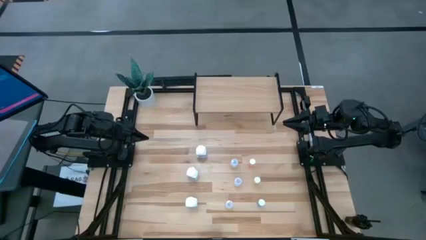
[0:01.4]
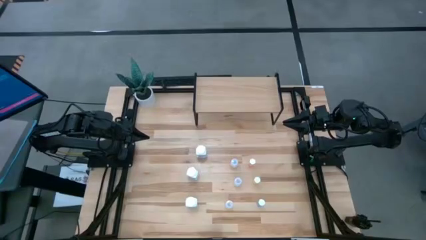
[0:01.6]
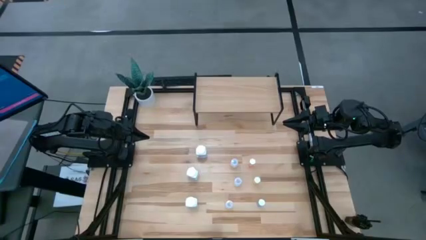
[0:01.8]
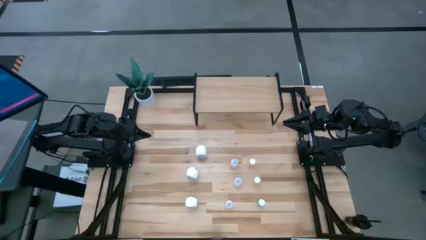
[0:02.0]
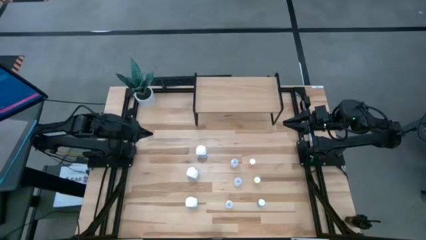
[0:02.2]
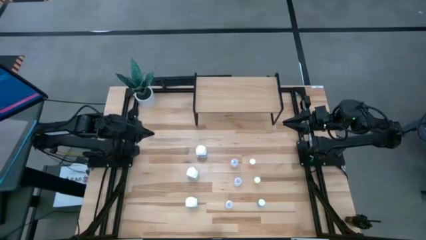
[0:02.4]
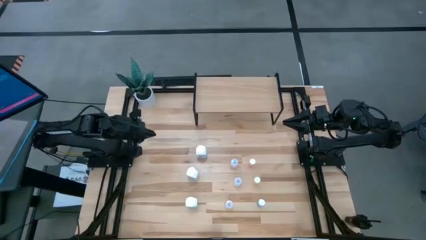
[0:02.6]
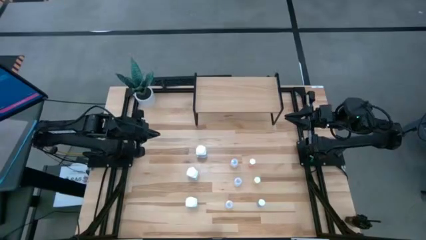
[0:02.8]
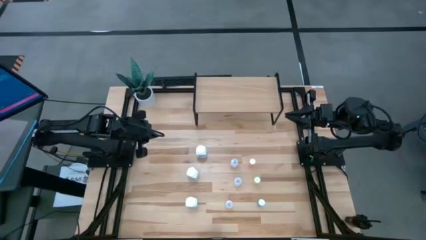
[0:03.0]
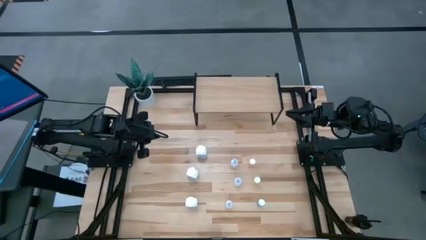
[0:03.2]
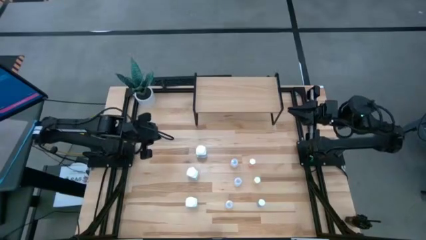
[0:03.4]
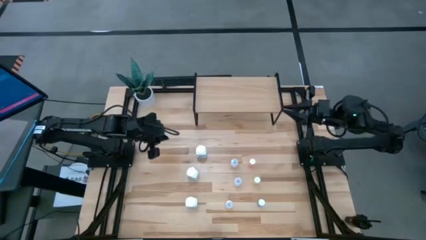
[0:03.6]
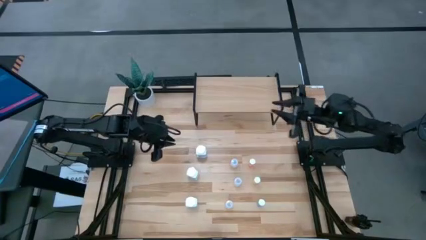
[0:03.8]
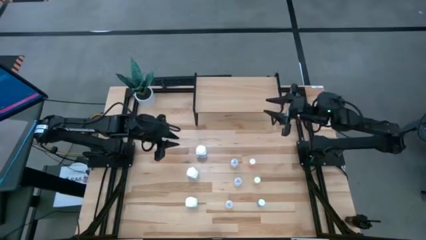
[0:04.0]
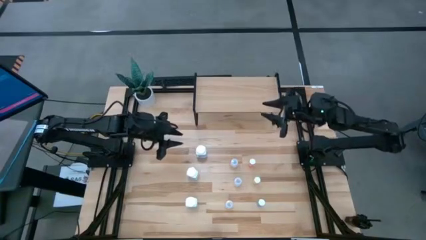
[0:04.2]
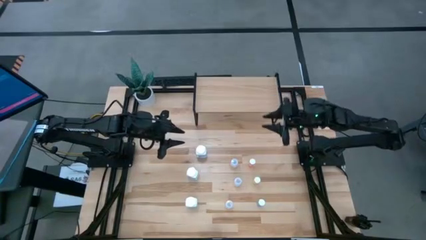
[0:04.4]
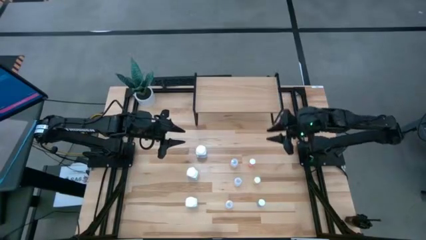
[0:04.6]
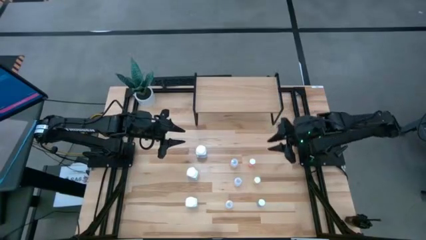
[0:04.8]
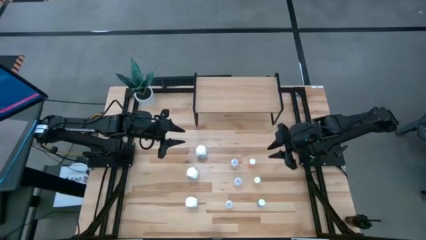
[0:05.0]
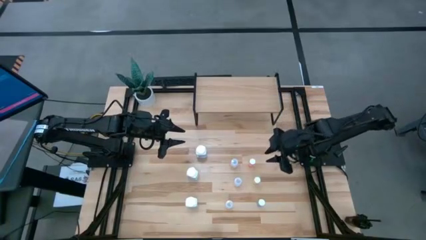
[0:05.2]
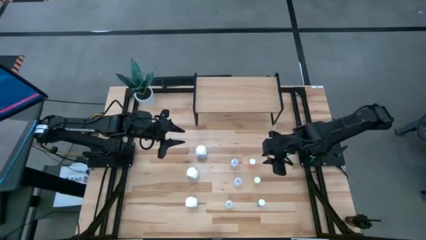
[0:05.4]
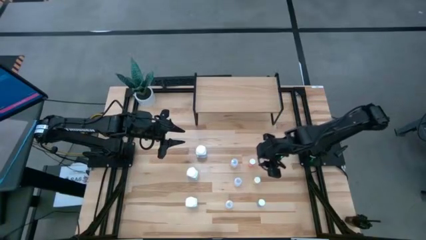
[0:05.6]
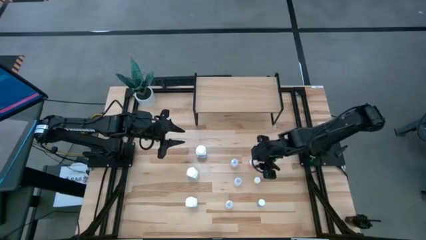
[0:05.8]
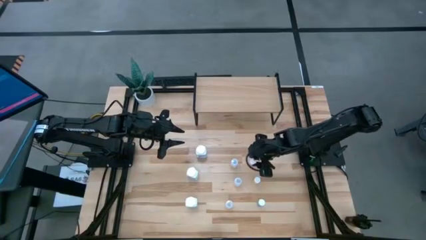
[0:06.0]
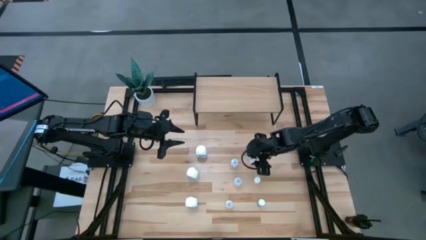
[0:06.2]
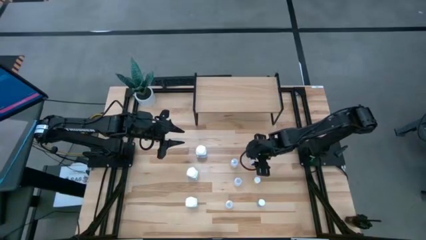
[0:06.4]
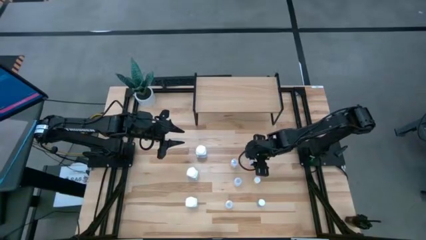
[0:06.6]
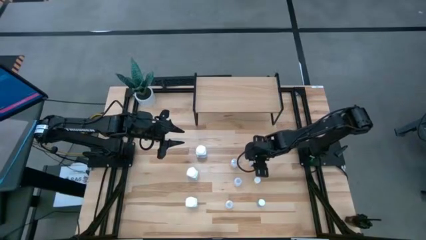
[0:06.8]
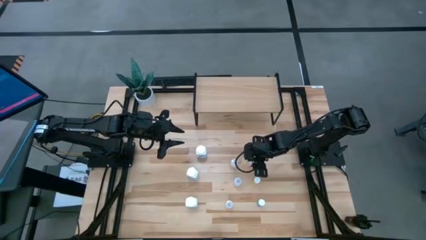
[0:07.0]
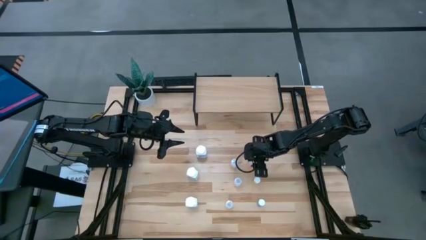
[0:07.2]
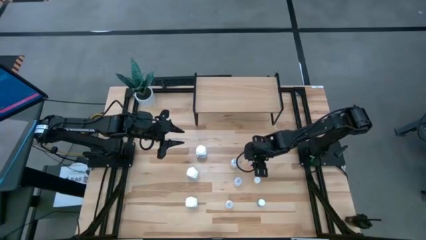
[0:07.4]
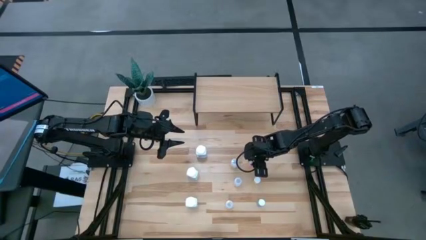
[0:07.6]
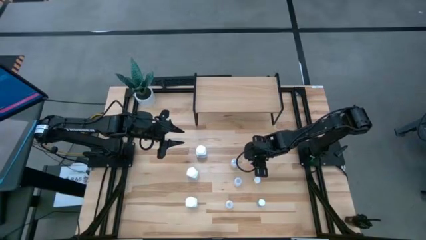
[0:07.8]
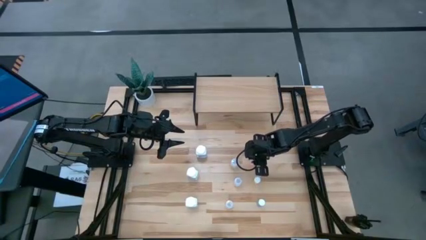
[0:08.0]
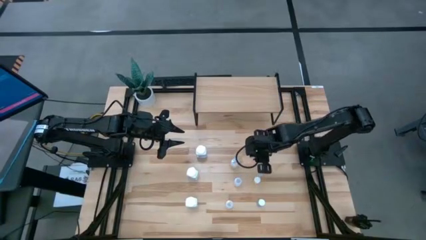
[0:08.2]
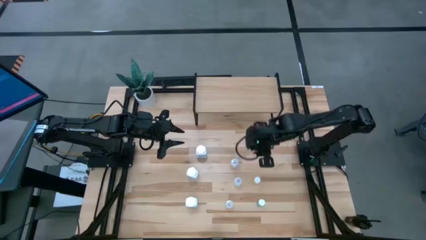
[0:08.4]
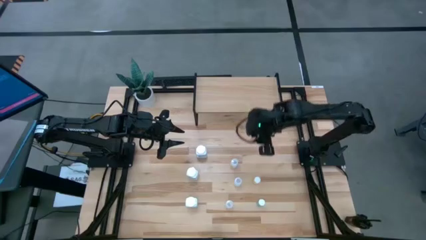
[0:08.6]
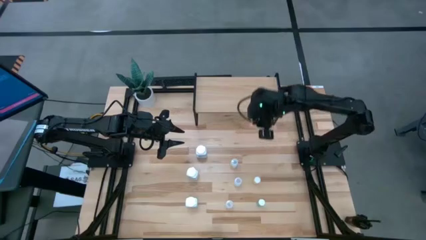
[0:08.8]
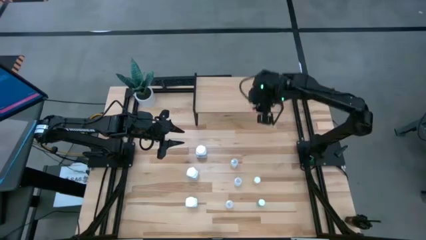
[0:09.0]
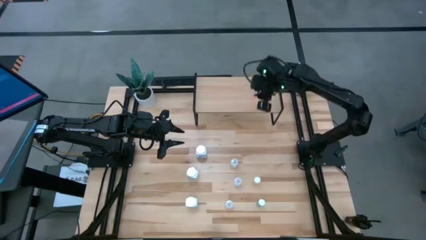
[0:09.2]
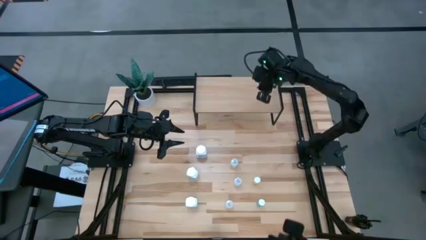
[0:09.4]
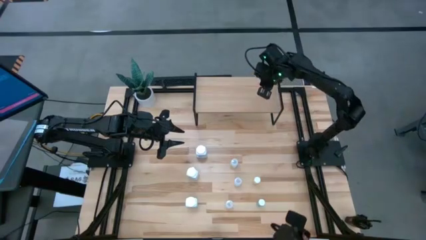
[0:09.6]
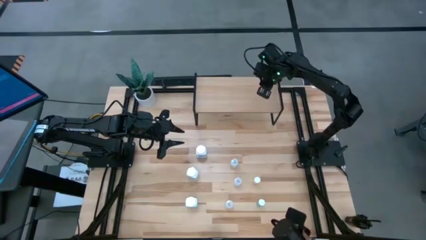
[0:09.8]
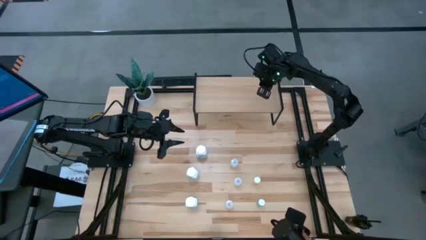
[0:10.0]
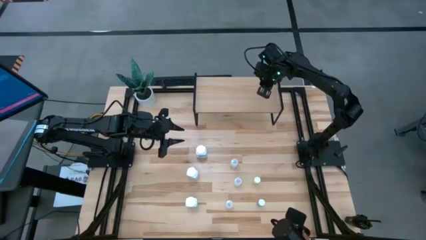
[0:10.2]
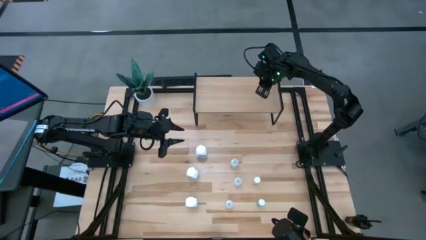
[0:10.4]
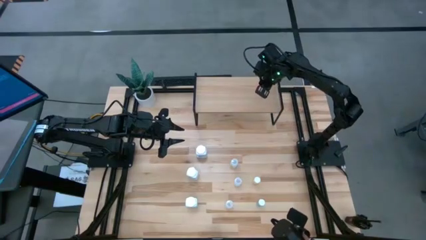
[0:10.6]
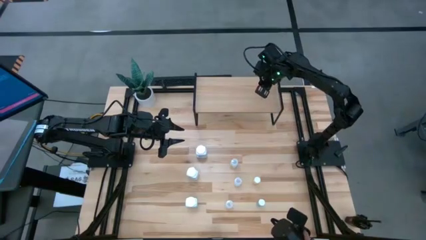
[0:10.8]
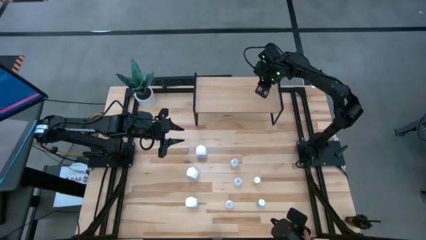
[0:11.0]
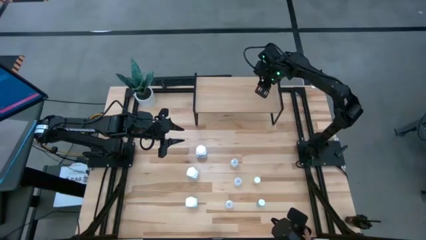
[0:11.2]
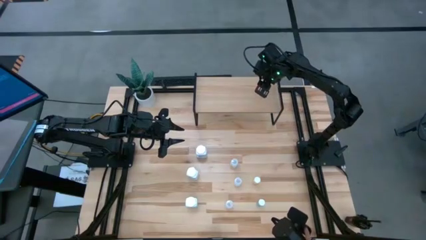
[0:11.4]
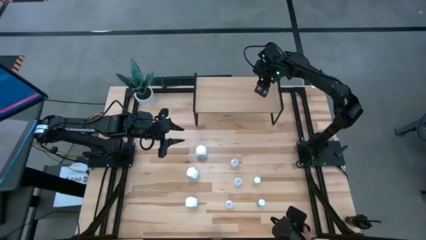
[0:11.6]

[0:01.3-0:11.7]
Task: Pick and place medicine bottles onto shelf by color
Put the pink pill bottle on the shelf

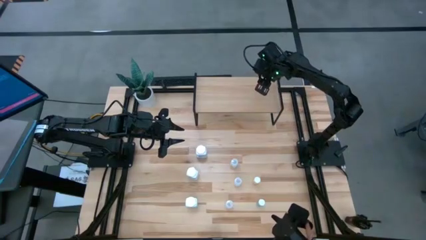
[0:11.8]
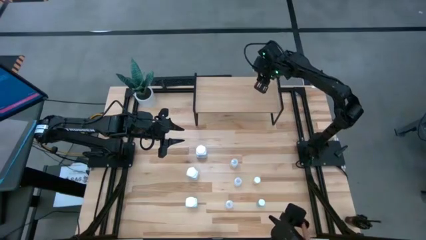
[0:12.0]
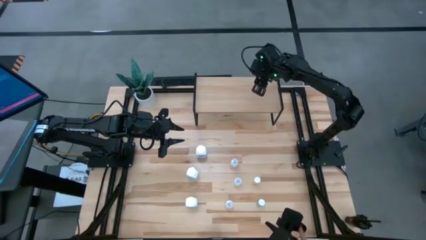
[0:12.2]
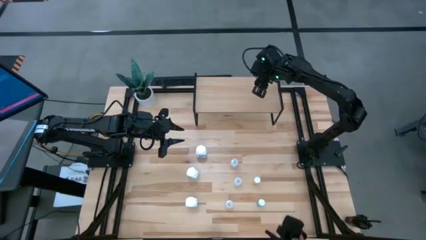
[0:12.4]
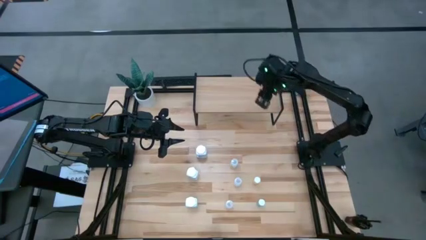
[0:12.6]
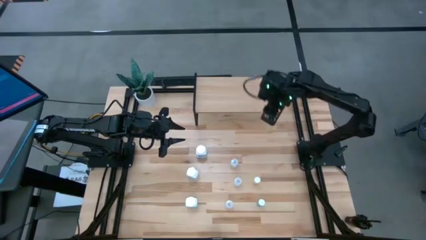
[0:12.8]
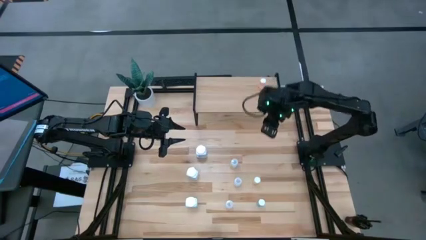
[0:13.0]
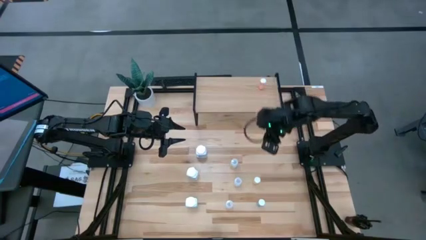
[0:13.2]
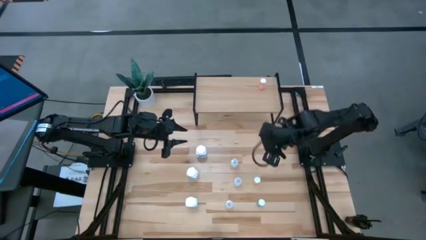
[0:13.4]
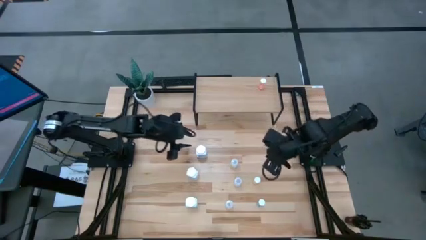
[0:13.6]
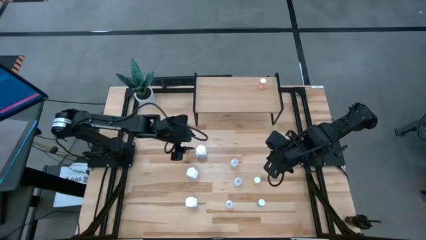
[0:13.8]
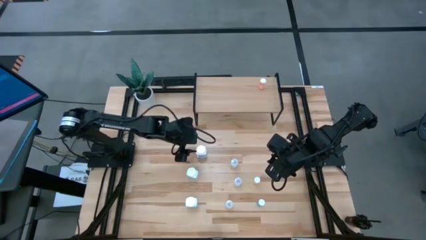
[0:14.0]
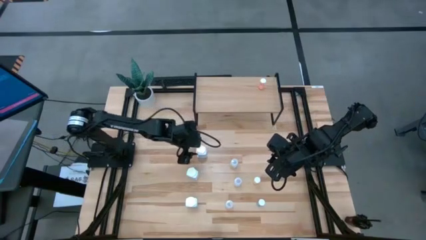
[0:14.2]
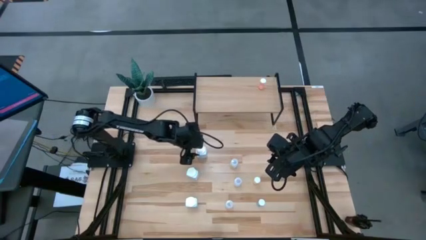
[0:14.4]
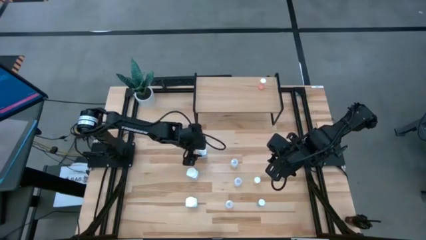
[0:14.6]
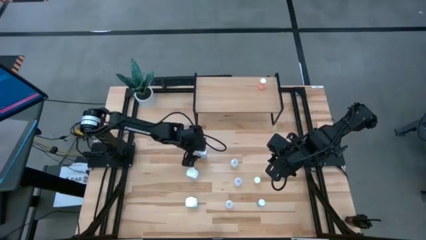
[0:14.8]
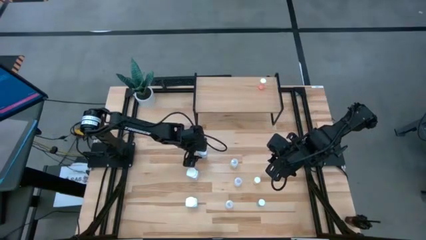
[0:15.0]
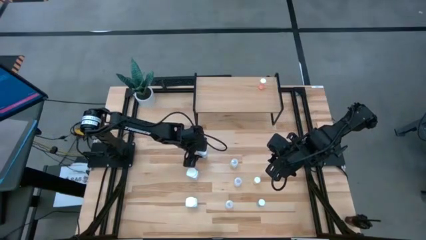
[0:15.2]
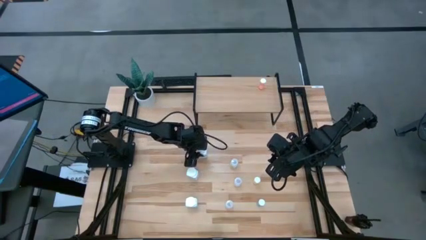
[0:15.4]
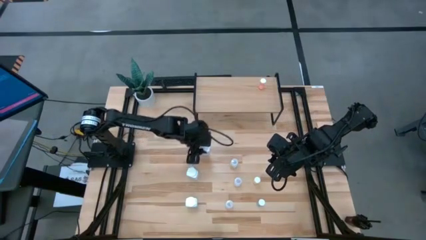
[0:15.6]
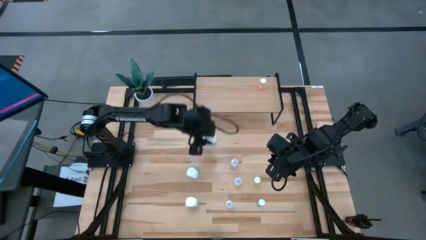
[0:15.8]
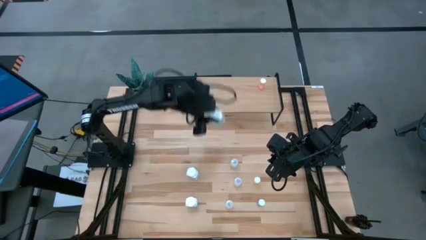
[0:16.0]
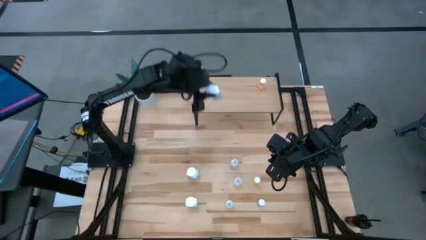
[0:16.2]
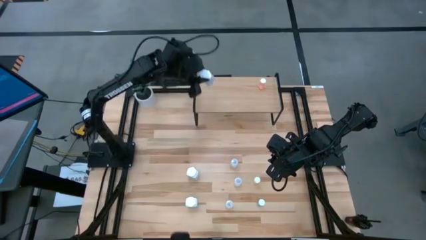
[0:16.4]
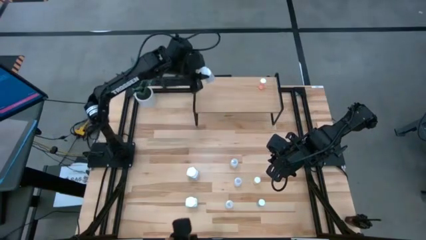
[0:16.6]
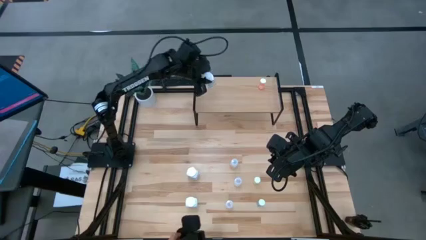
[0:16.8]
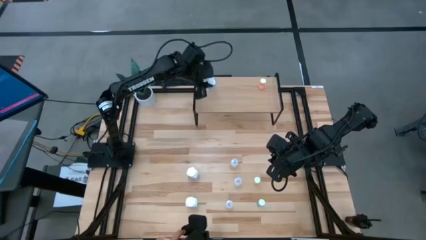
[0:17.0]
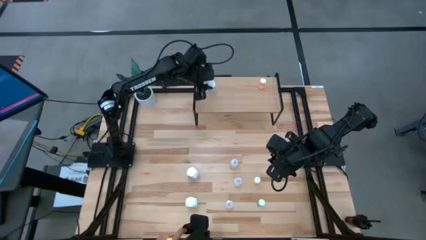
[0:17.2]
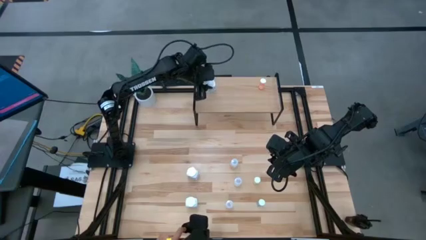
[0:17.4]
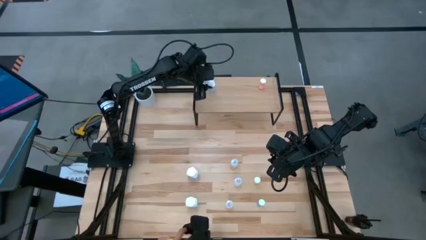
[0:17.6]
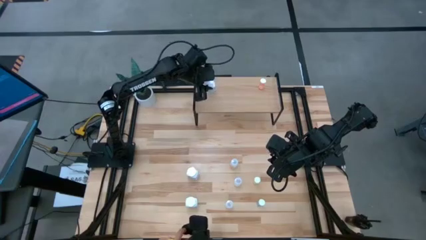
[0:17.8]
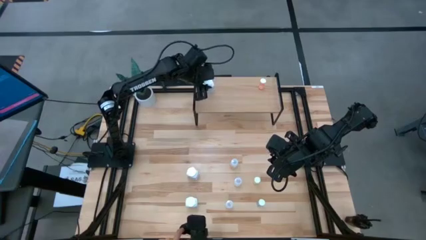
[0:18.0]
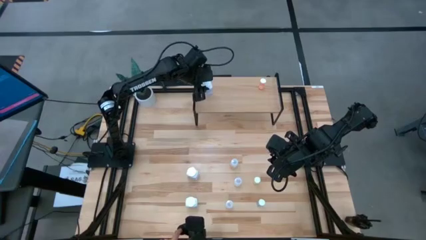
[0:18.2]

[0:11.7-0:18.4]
Put the top white pill bottle on the shelf
